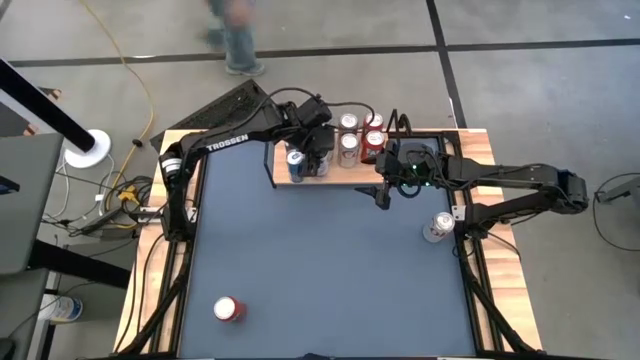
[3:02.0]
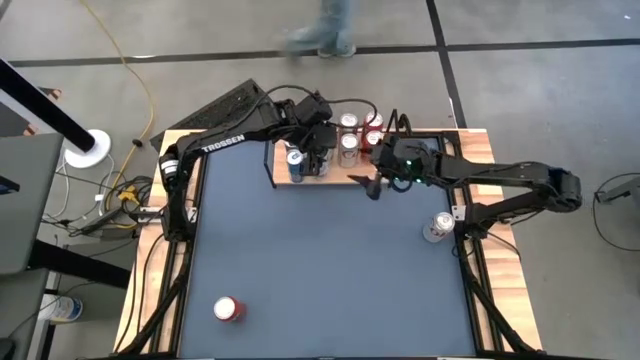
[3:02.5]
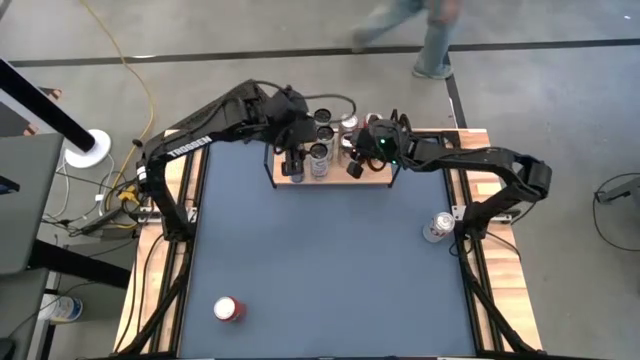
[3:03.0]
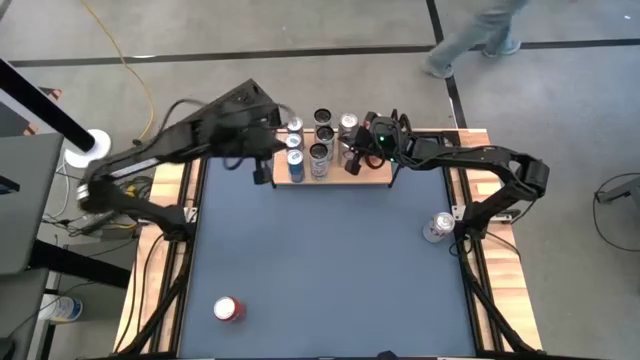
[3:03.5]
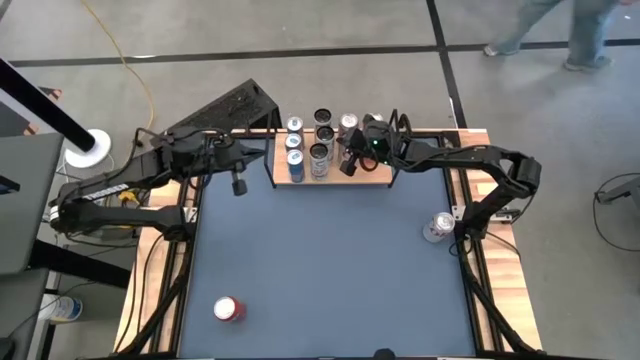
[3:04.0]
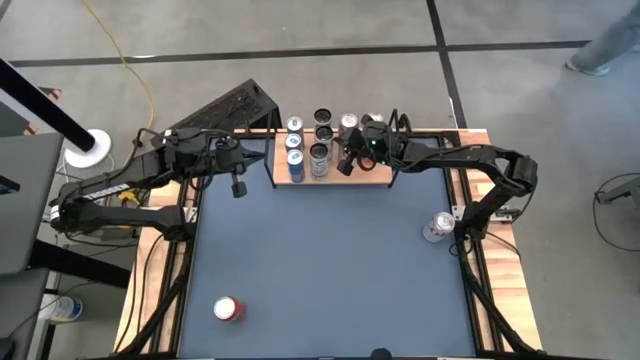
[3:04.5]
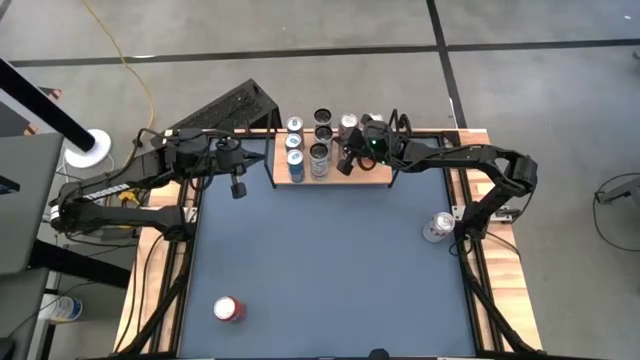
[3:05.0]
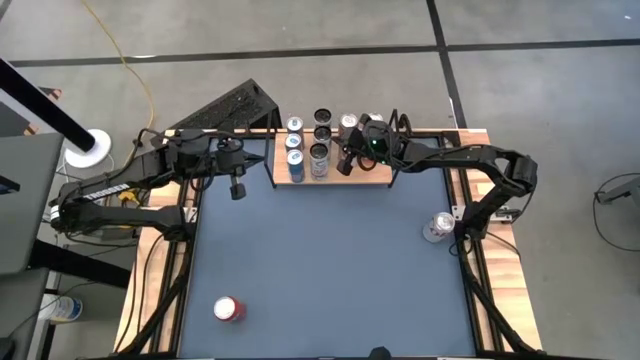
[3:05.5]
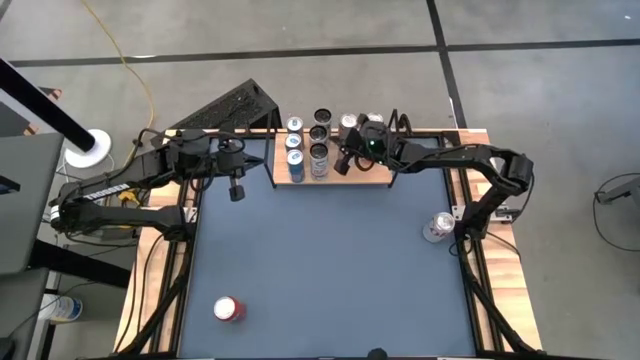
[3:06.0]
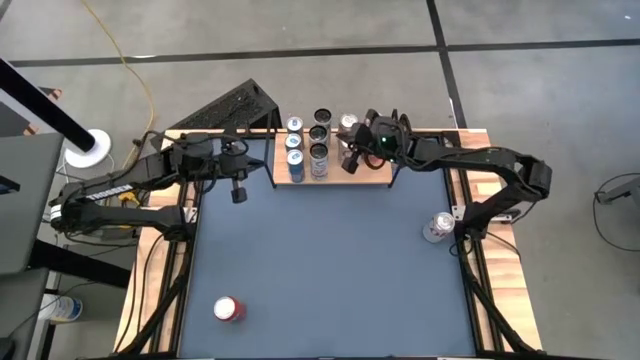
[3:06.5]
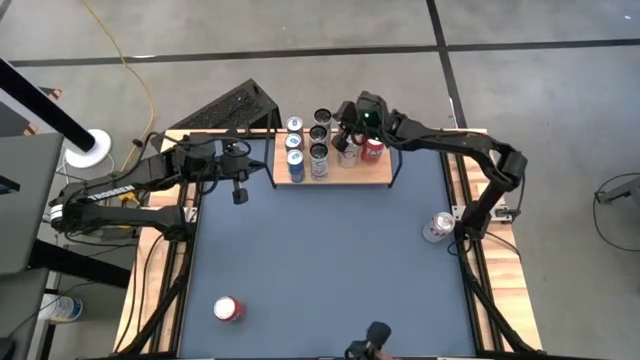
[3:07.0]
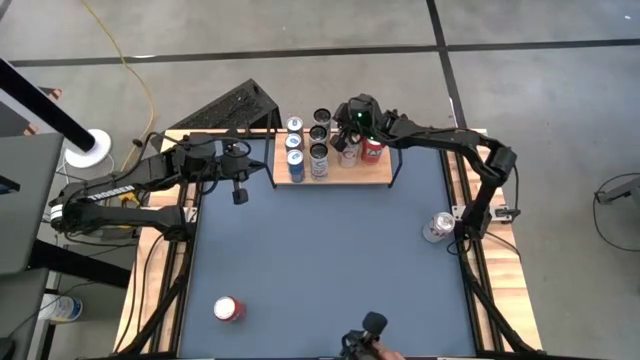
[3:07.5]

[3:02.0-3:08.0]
Task: Place canned beverage on shelf
Adjust the white-pink cans on the shelf

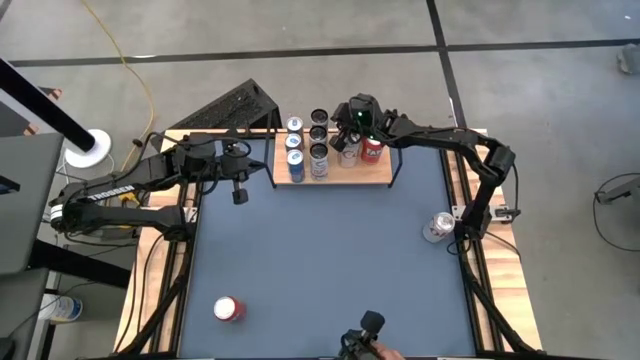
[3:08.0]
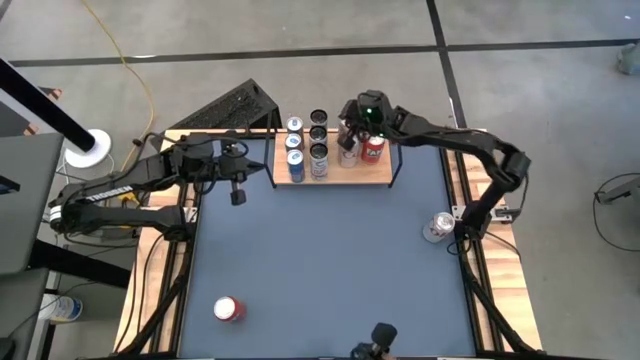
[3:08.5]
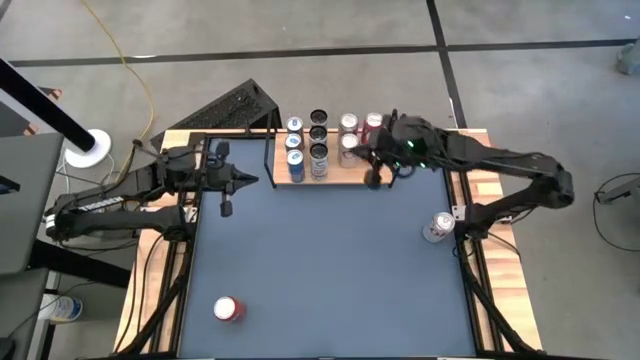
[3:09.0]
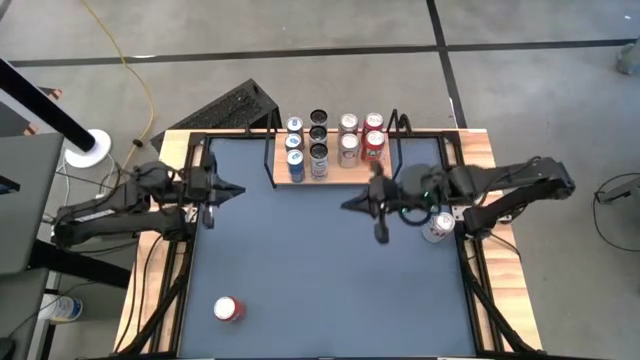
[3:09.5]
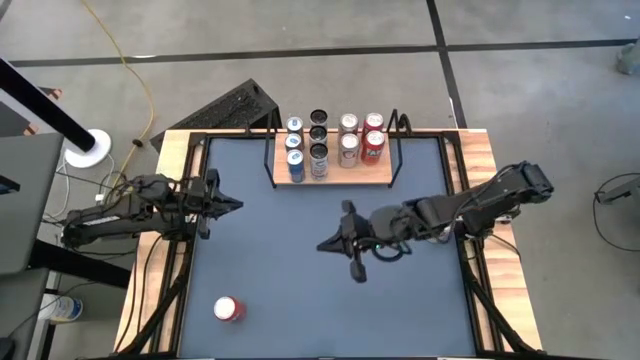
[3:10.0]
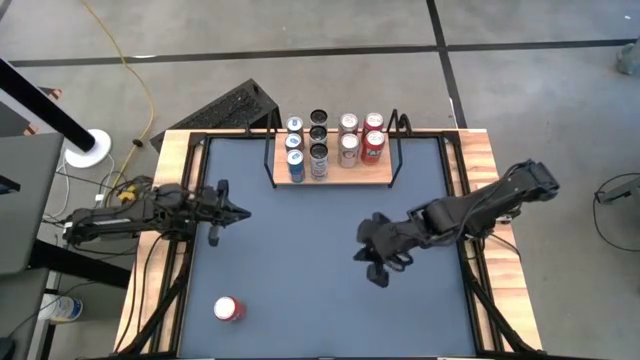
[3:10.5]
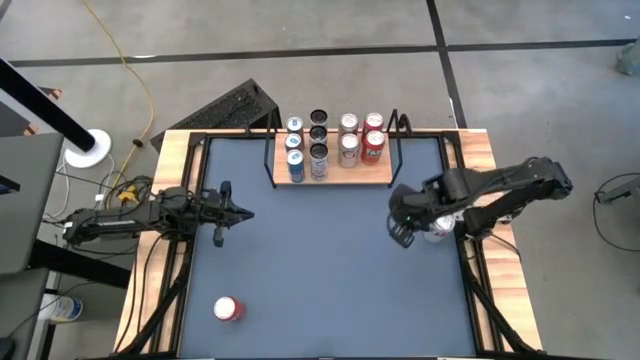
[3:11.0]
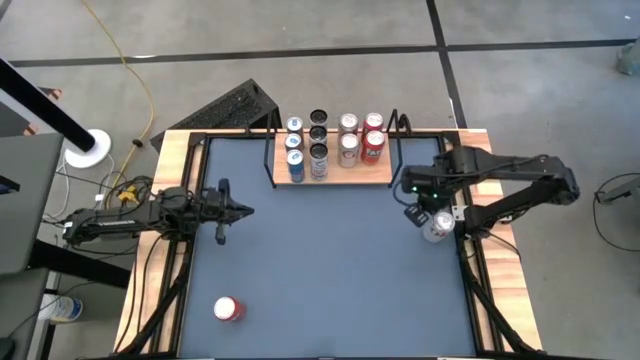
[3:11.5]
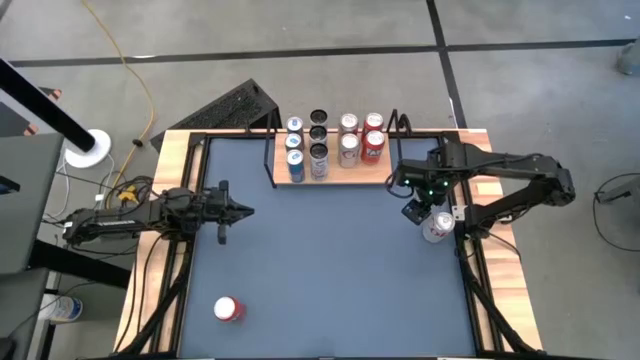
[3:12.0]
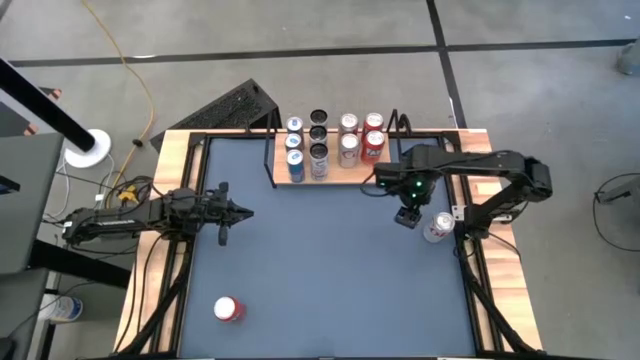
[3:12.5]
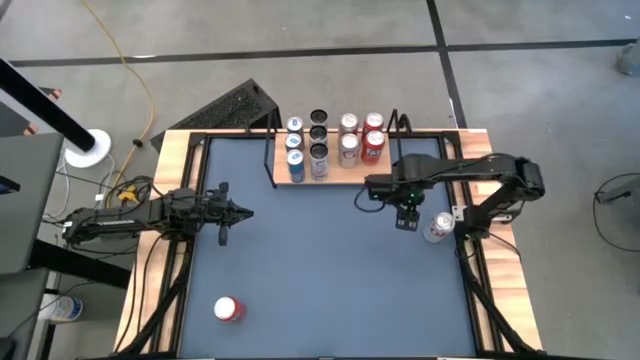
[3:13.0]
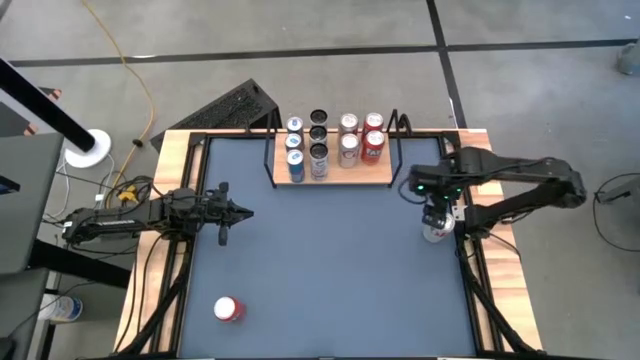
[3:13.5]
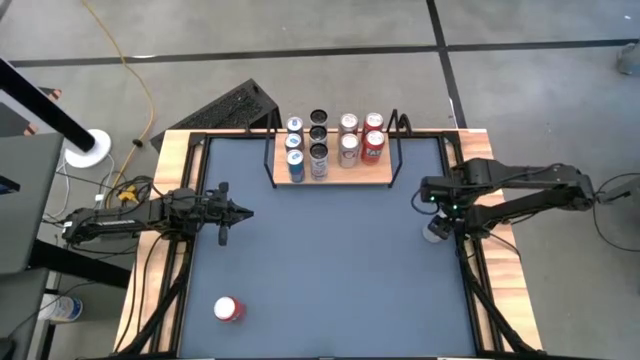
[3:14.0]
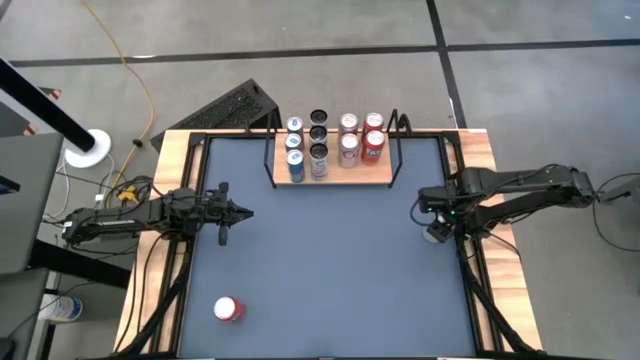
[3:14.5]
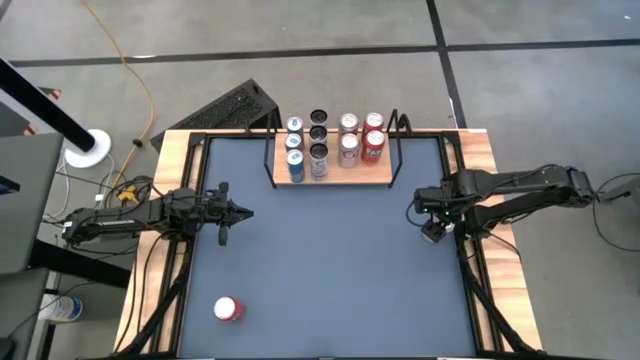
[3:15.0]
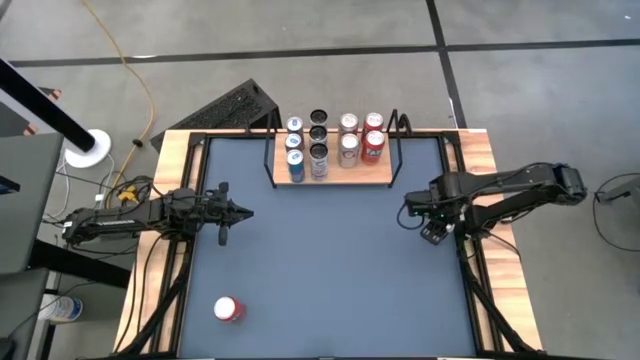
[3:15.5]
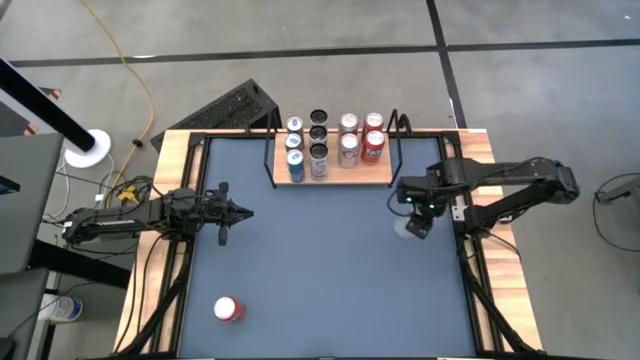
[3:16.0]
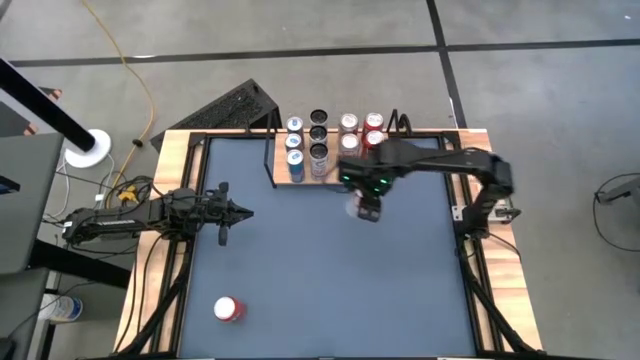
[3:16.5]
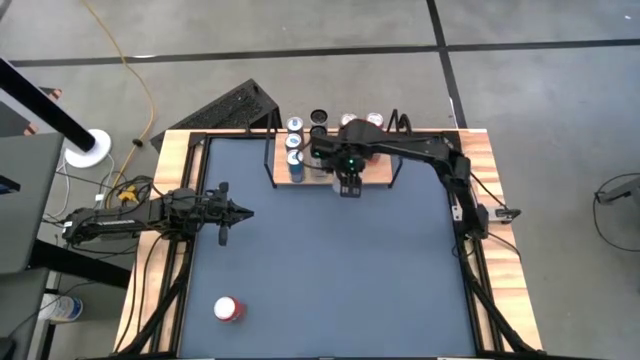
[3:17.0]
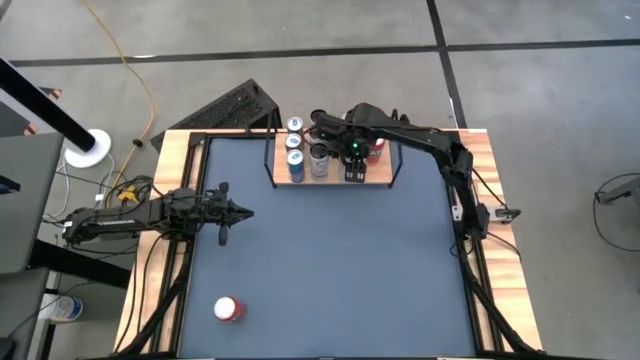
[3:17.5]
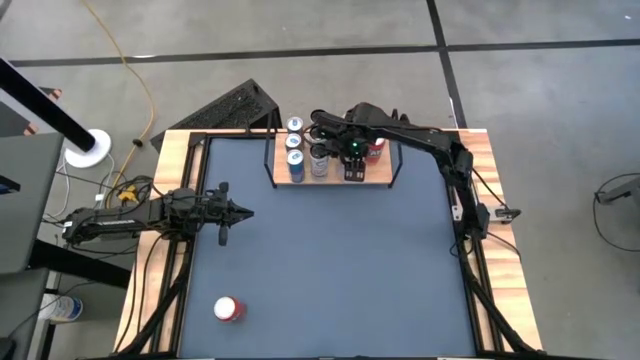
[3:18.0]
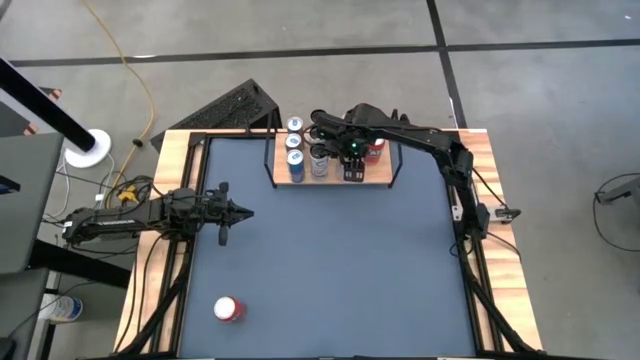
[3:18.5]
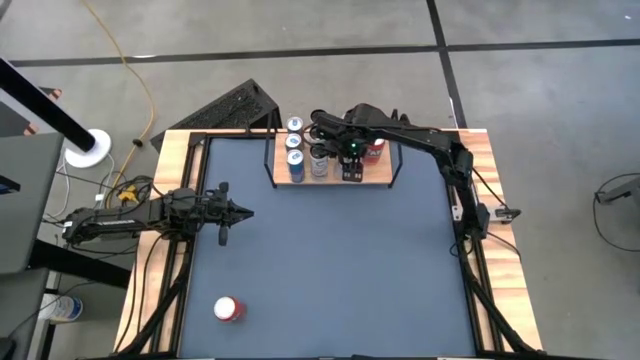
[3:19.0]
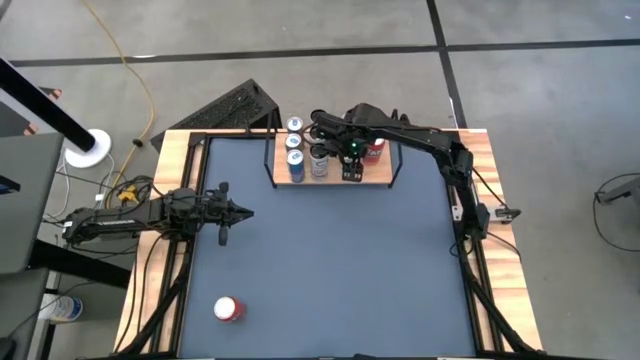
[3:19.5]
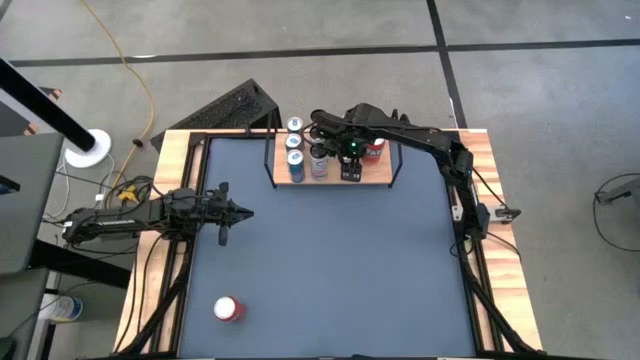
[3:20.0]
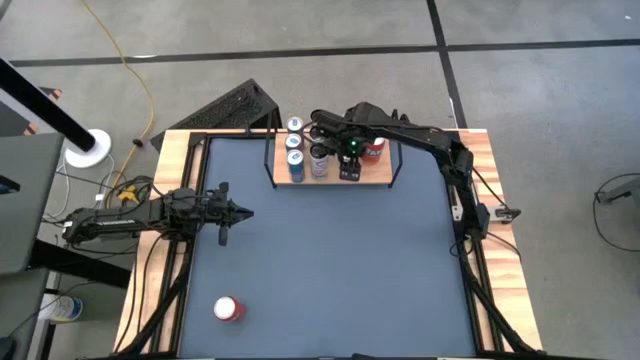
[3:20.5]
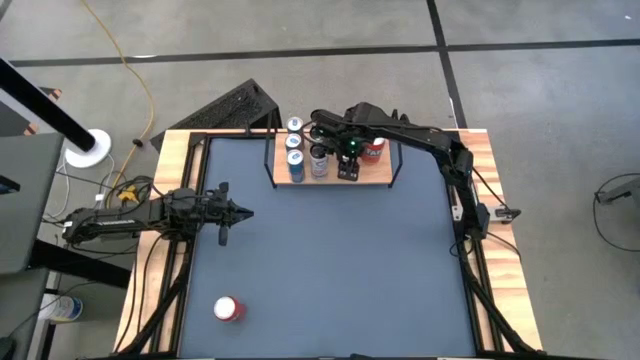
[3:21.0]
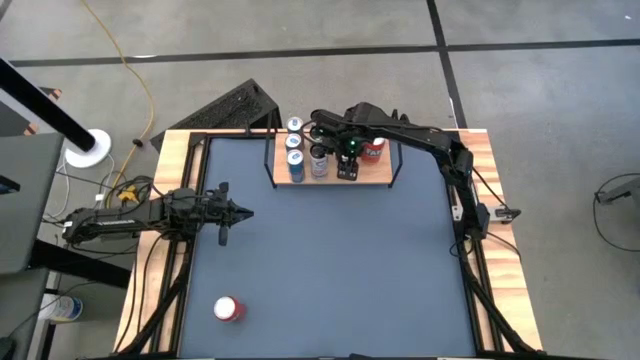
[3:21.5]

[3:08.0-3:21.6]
Put the red-silver soda can on the shelf aligned with the other red-silver soda can
